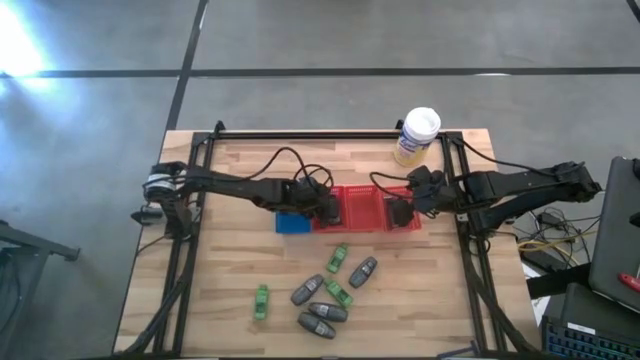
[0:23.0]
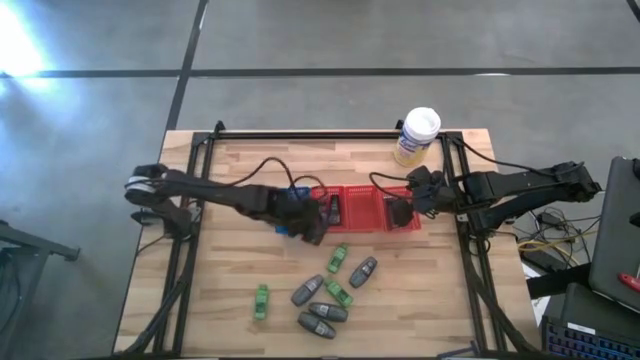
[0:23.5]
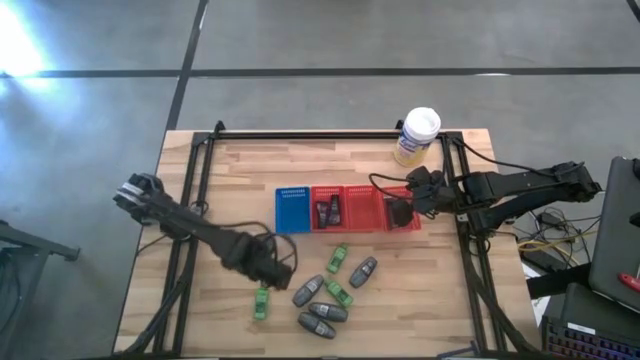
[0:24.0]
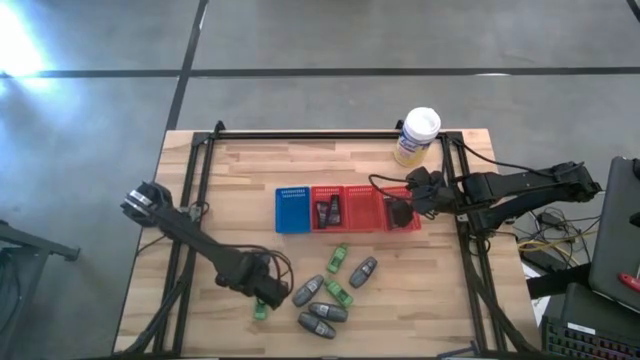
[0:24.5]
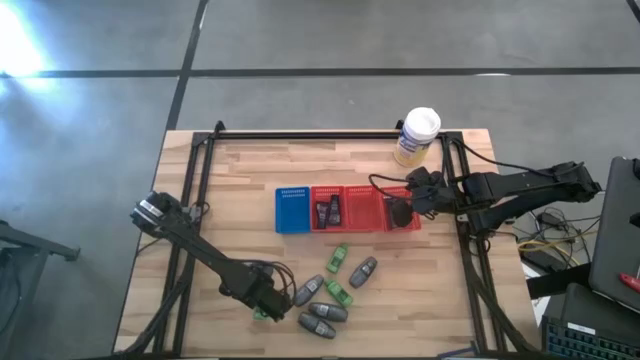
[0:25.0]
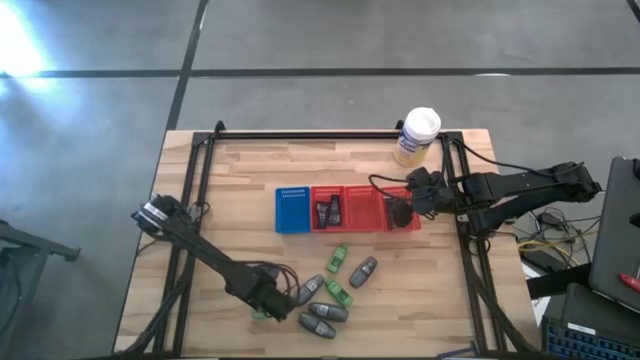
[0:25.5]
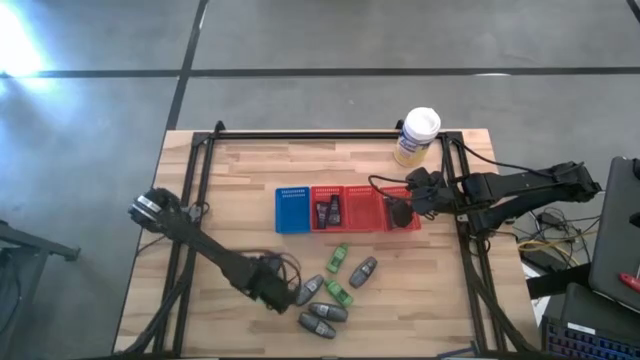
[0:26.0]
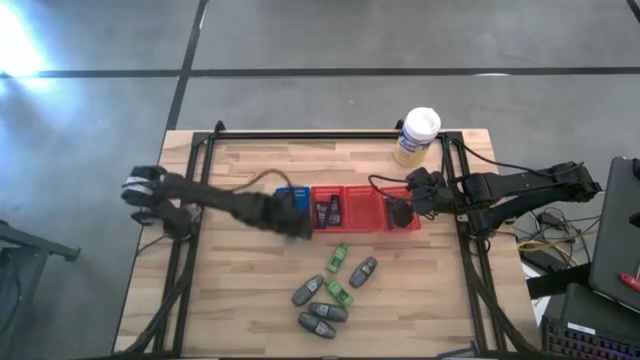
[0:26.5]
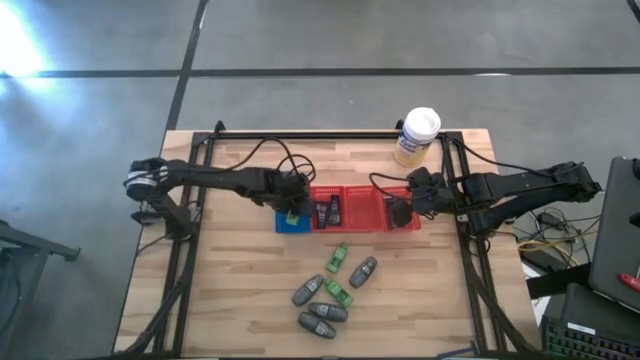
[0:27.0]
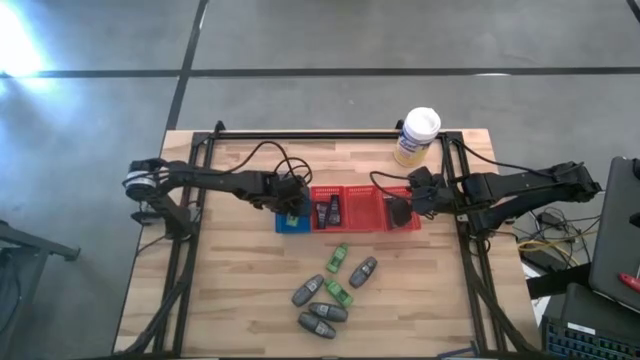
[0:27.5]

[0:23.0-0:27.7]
Task: Pick & Place Travel size toiletries
Put the green shampoo into the blue bin

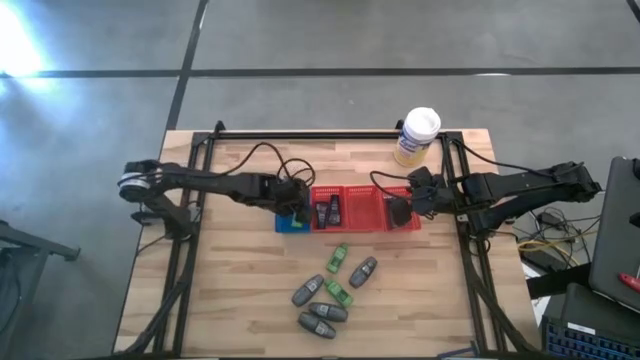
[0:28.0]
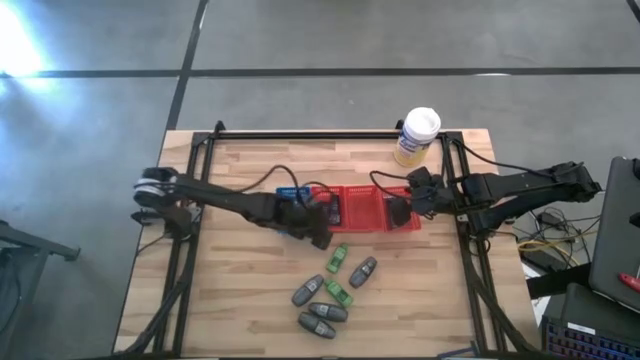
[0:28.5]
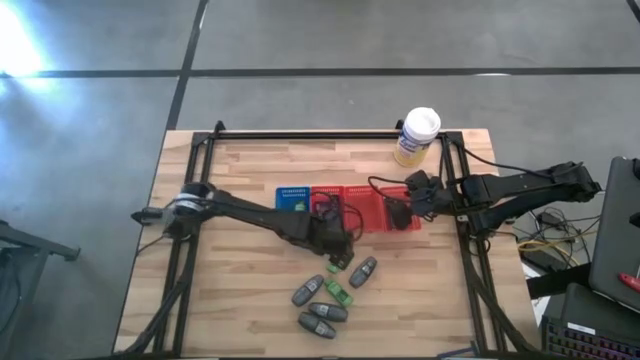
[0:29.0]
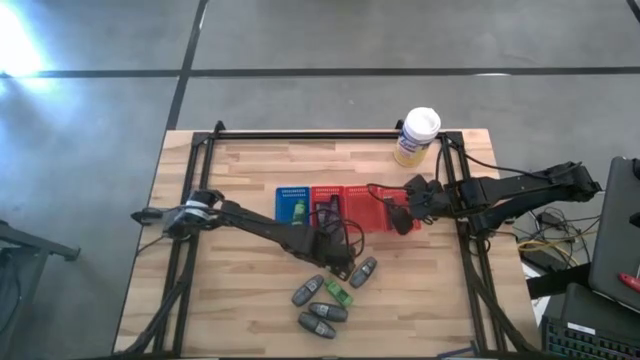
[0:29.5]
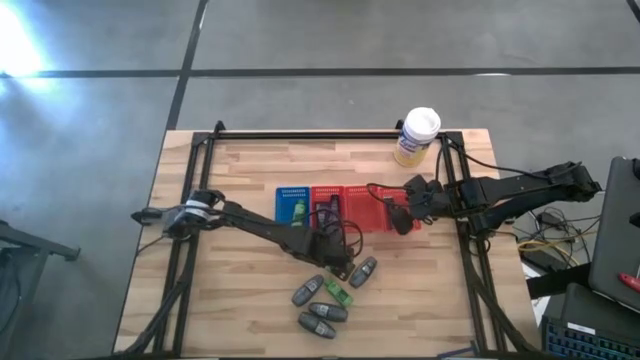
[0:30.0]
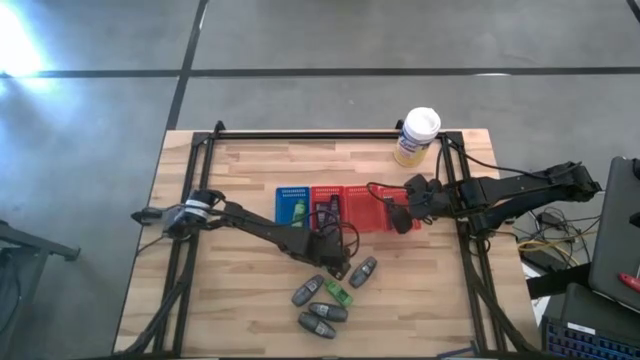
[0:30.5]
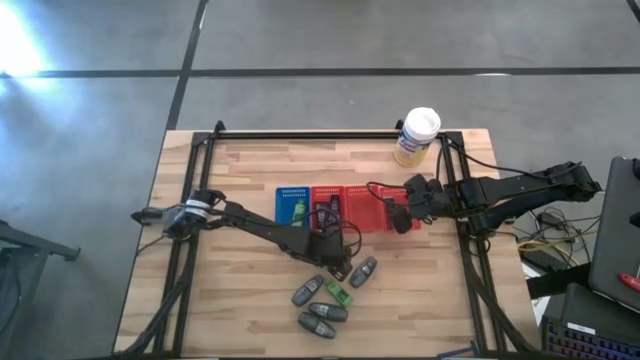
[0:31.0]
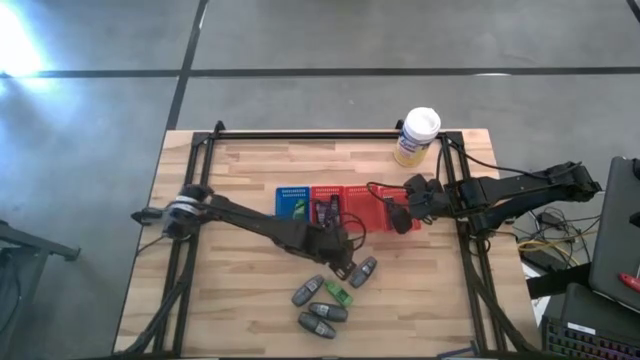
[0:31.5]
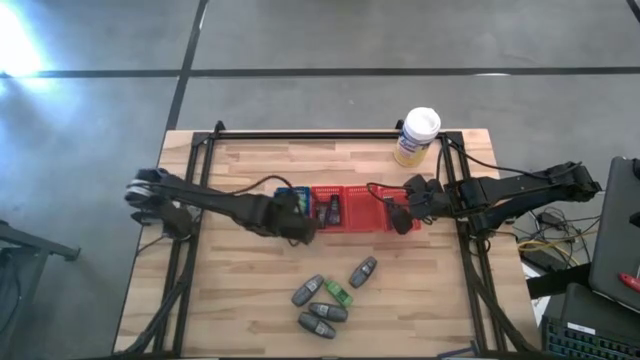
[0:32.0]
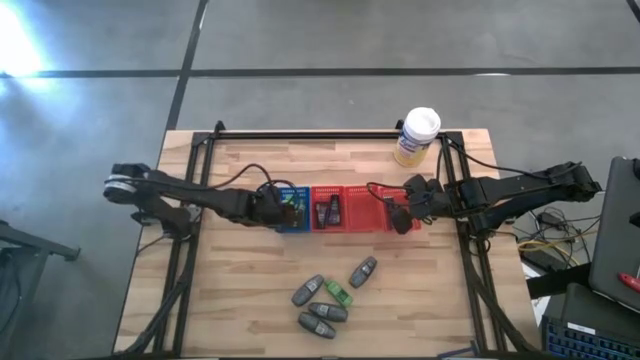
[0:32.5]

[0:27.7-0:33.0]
Put the green shampoo into the blue bin

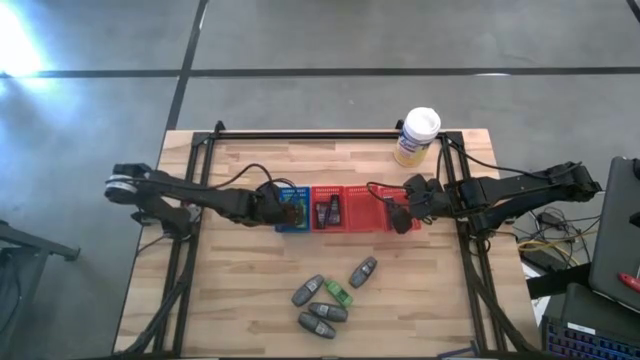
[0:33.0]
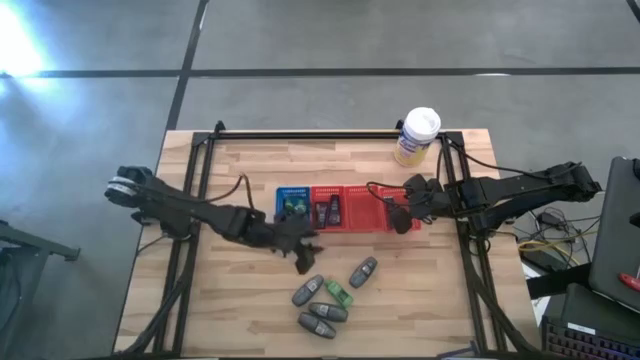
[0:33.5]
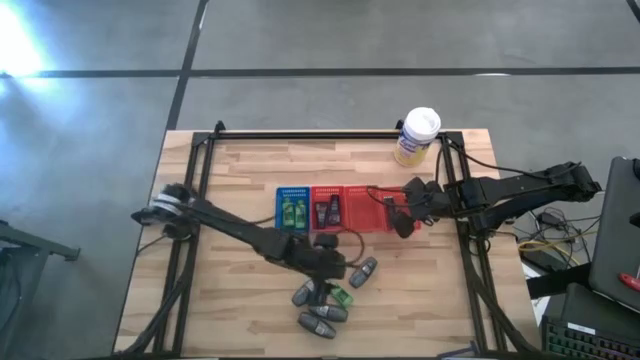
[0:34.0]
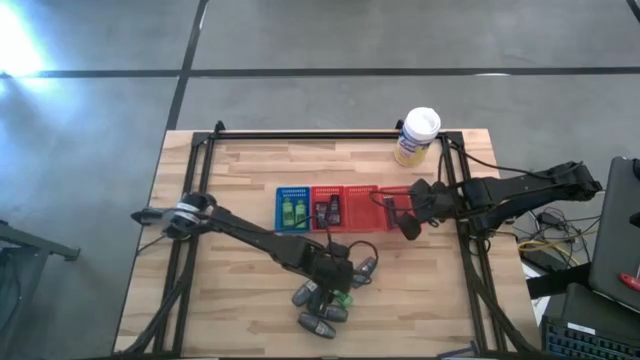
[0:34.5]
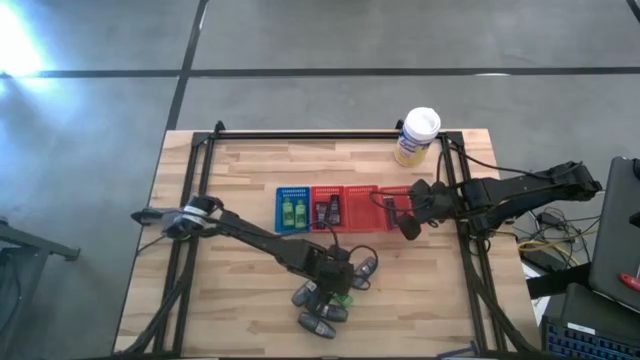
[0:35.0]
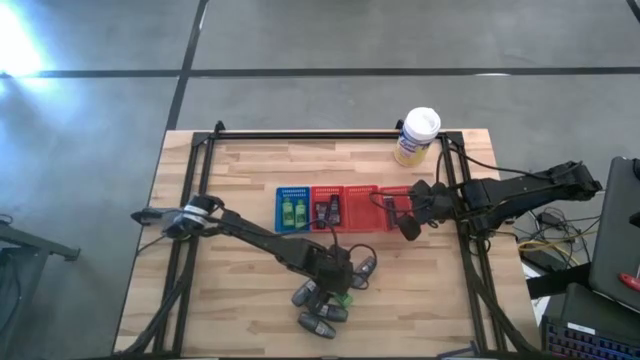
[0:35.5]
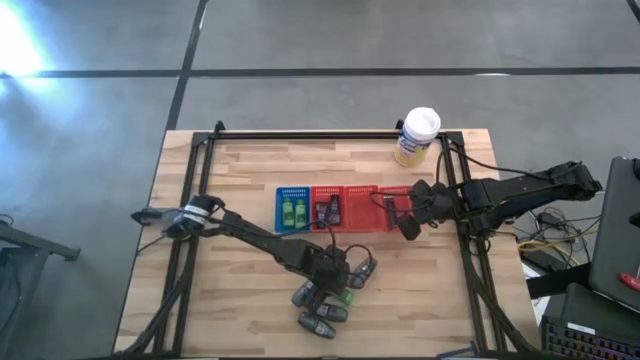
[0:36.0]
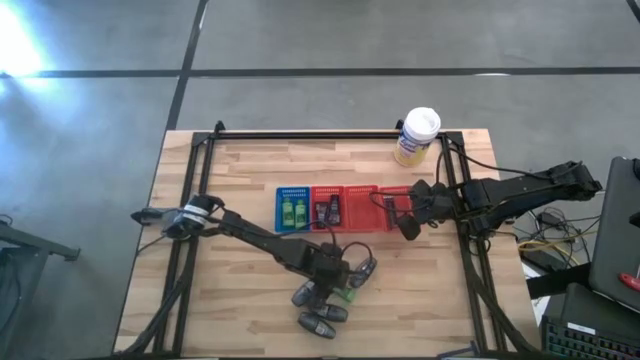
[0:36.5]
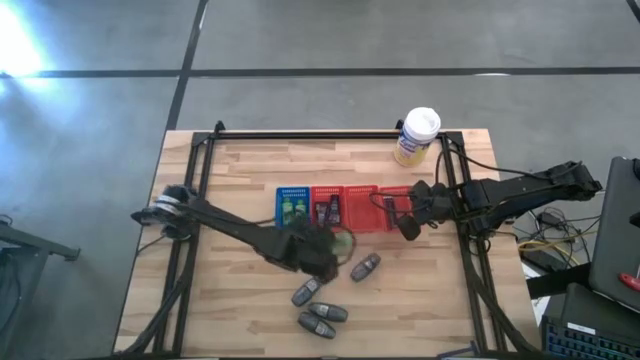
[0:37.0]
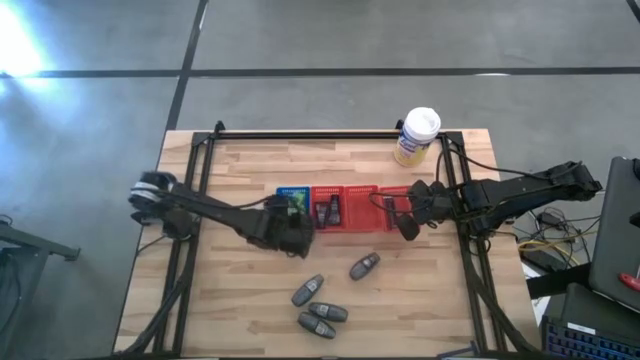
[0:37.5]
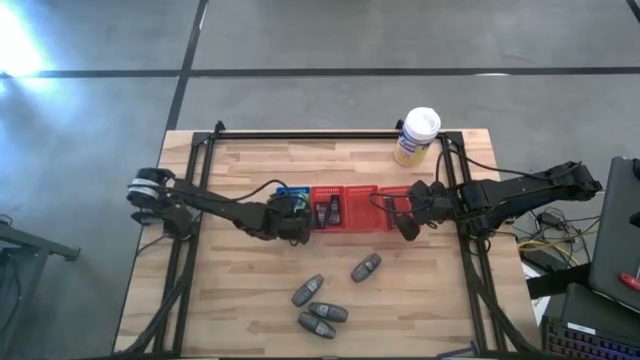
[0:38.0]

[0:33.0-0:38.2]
Put the green shampoo into the blue bin

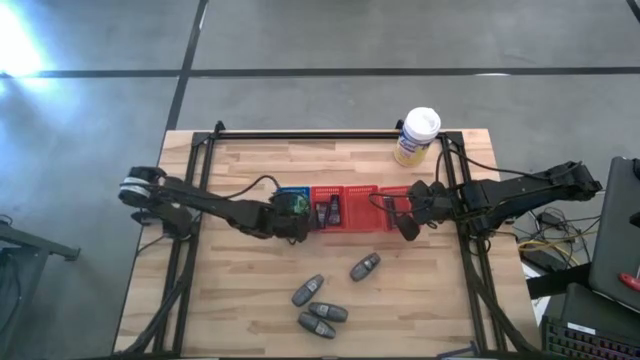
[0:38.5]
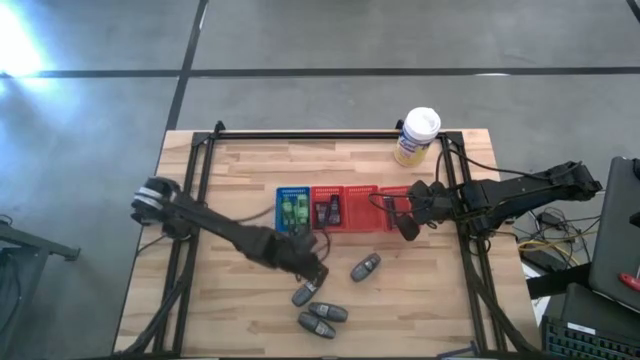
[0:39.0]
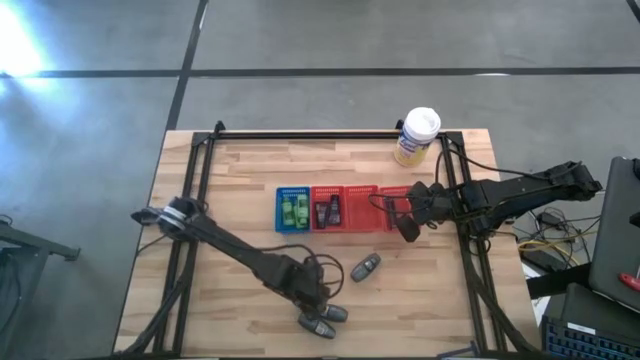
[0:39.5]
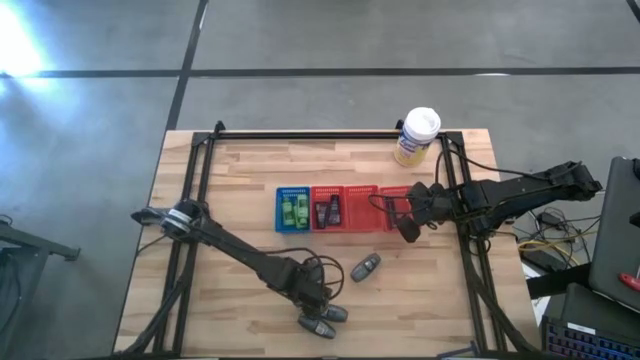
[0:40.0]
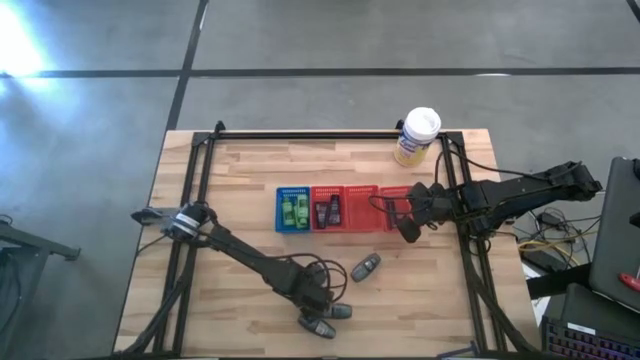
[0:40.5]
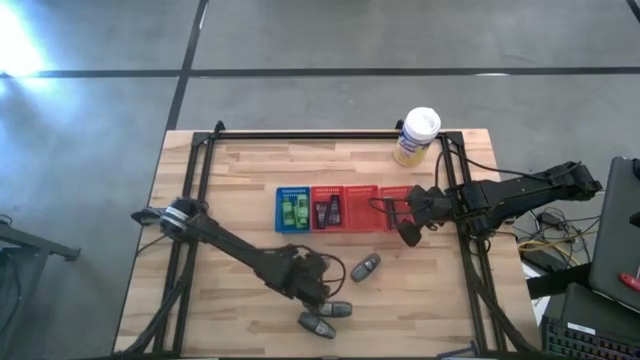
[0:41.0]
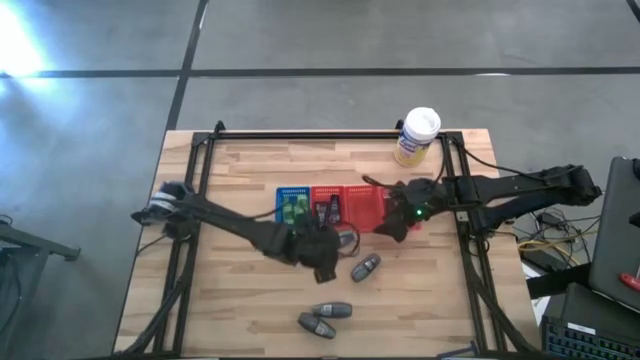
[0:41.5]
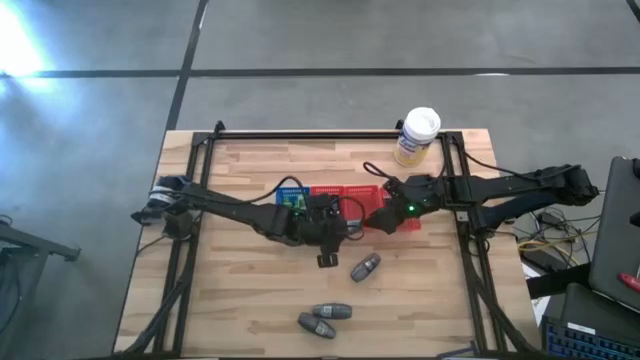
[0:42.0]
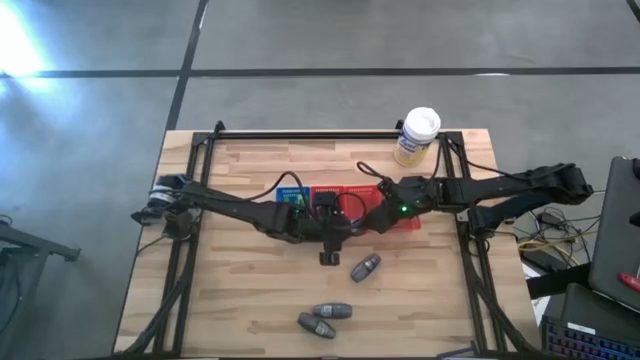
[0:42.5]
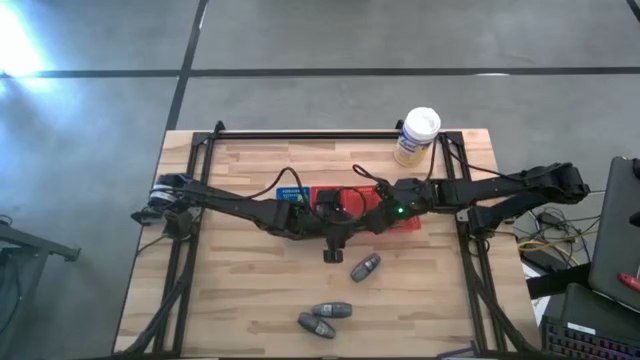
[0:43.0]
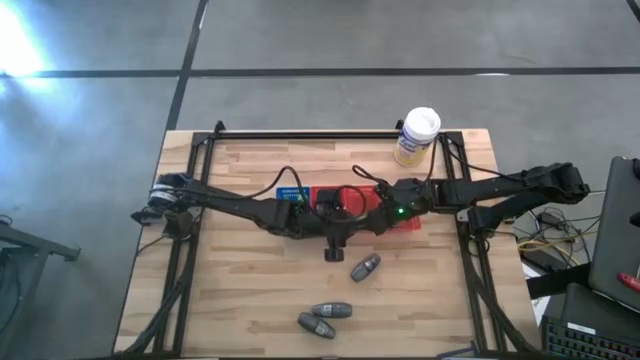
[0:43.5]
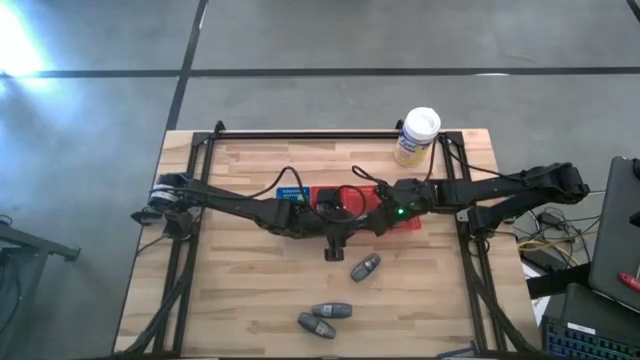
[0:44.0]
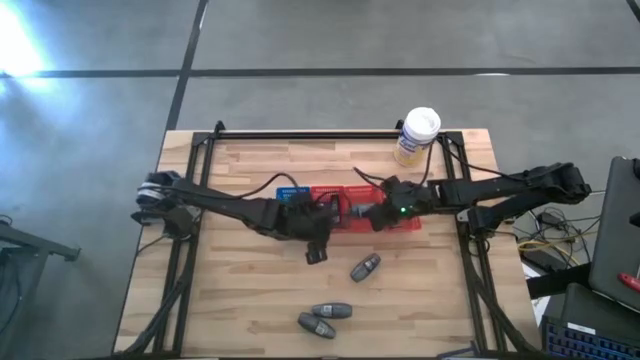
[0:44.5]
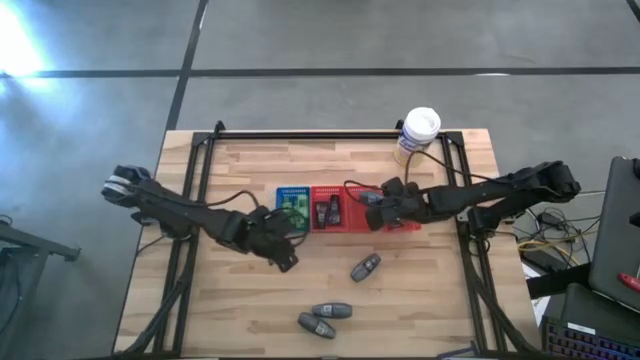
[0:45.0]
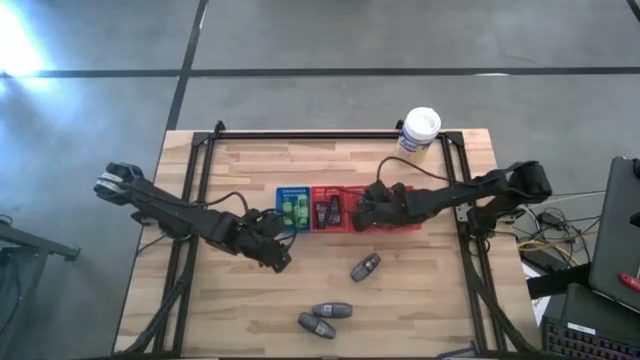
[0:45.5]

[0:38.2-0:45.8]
Put the gray deodorant into the middle red bin
